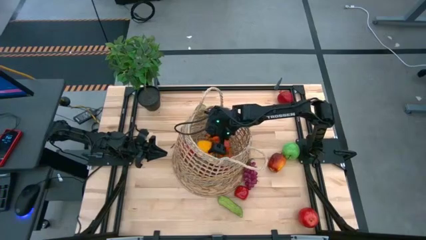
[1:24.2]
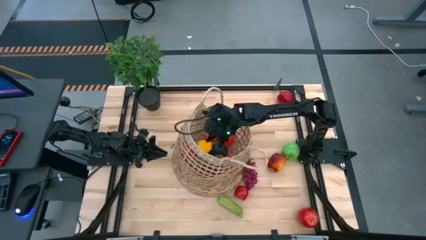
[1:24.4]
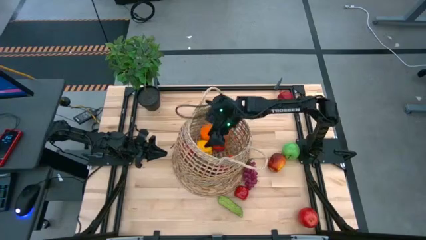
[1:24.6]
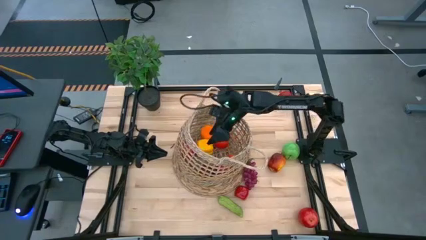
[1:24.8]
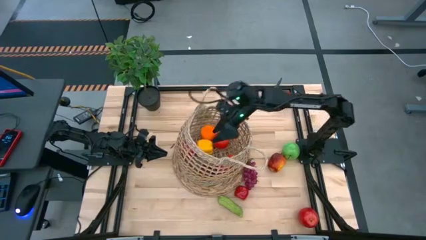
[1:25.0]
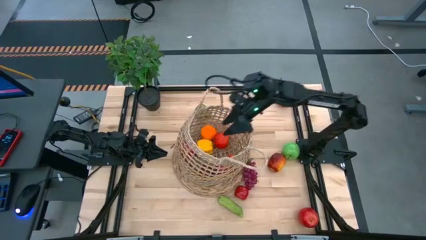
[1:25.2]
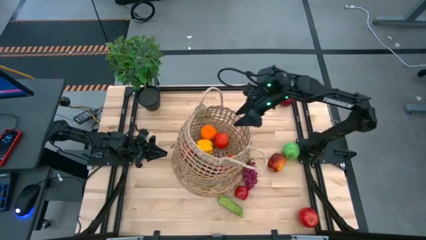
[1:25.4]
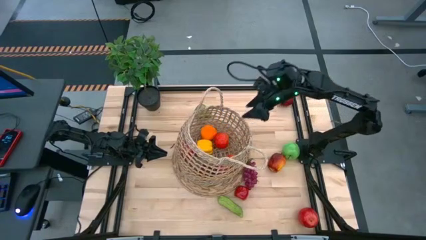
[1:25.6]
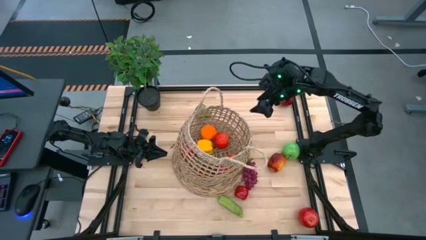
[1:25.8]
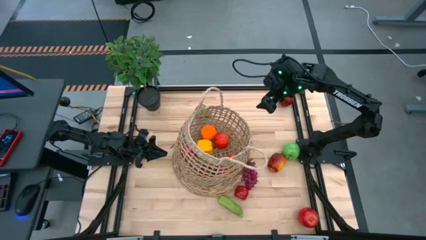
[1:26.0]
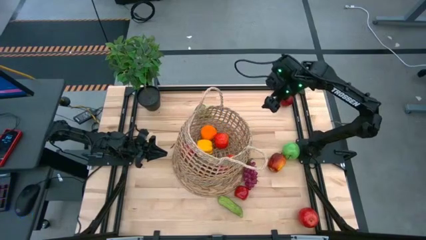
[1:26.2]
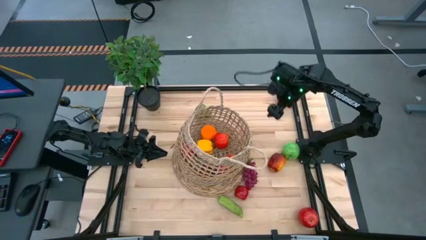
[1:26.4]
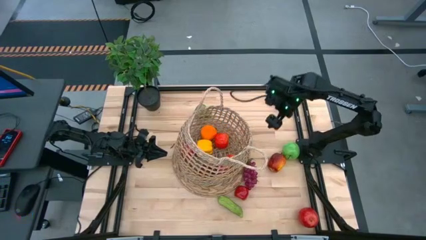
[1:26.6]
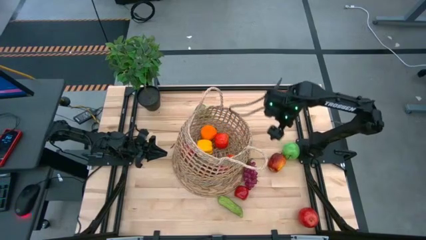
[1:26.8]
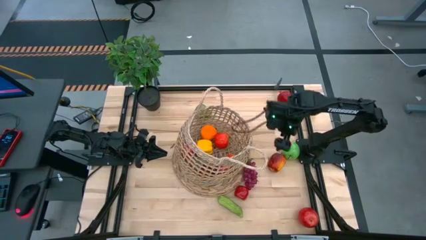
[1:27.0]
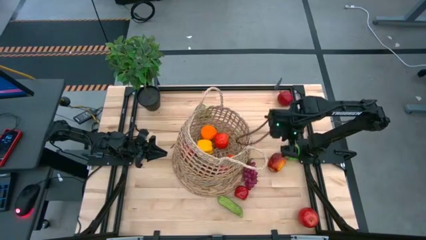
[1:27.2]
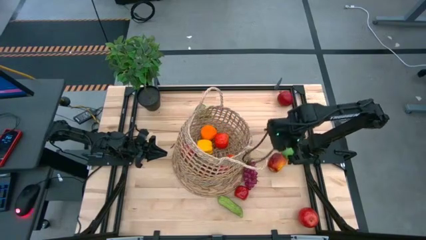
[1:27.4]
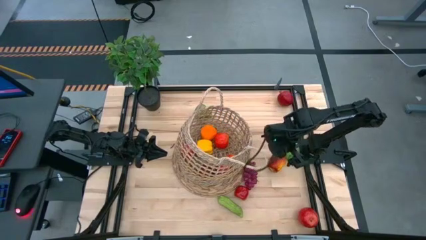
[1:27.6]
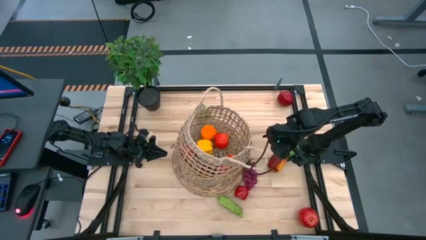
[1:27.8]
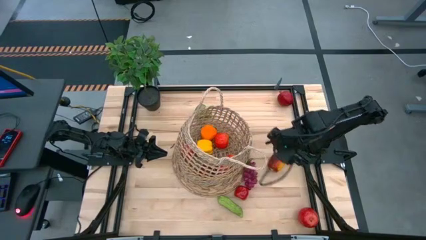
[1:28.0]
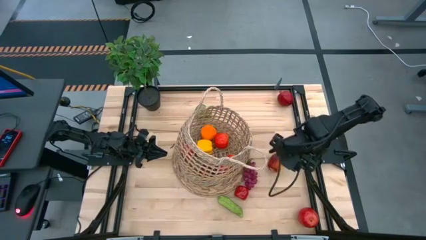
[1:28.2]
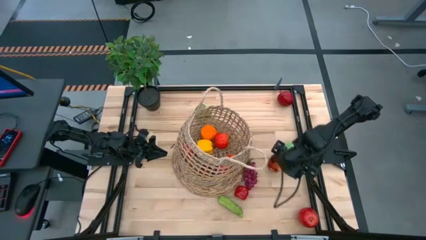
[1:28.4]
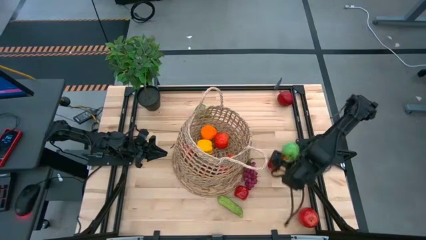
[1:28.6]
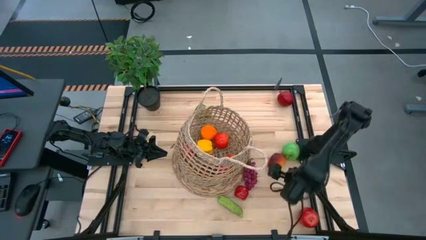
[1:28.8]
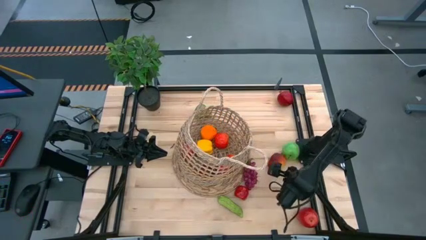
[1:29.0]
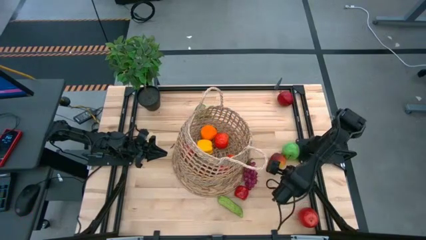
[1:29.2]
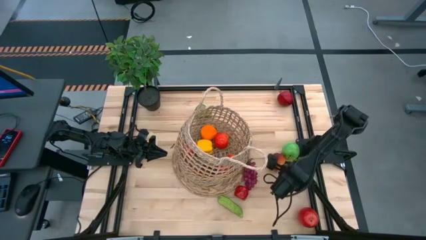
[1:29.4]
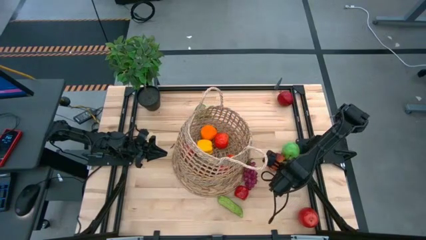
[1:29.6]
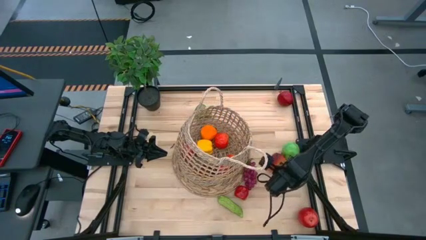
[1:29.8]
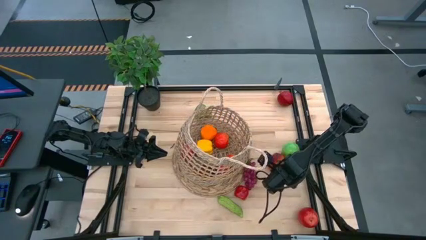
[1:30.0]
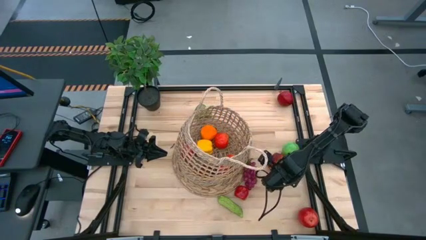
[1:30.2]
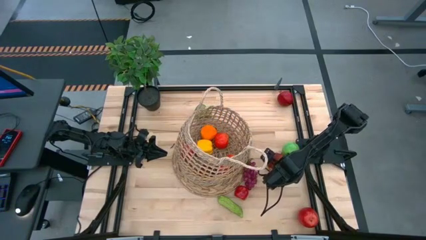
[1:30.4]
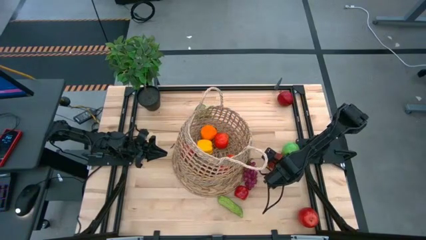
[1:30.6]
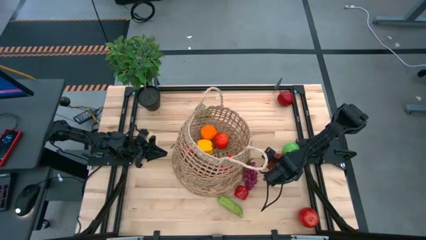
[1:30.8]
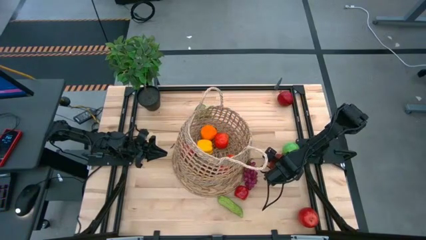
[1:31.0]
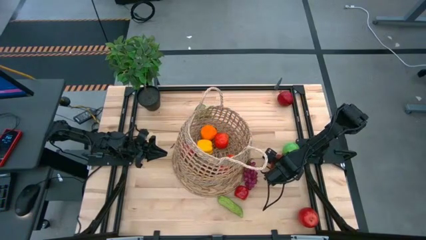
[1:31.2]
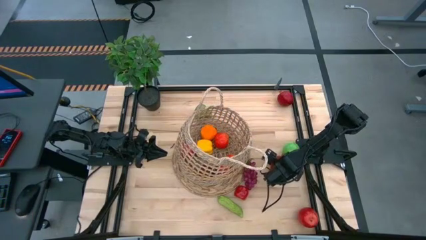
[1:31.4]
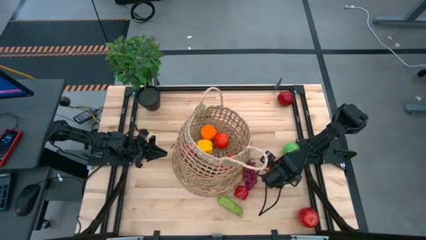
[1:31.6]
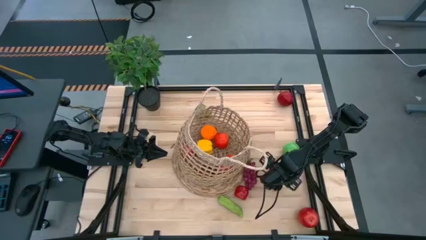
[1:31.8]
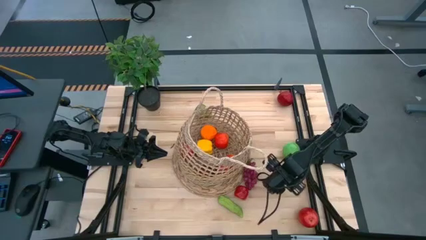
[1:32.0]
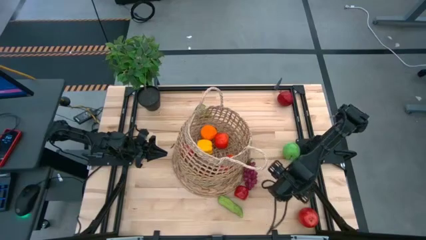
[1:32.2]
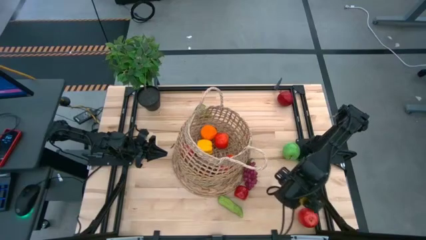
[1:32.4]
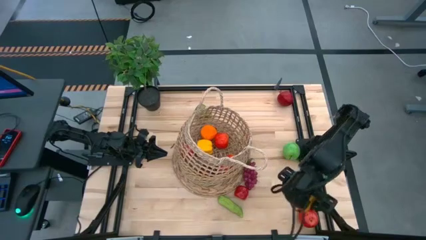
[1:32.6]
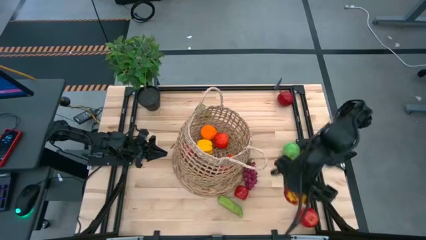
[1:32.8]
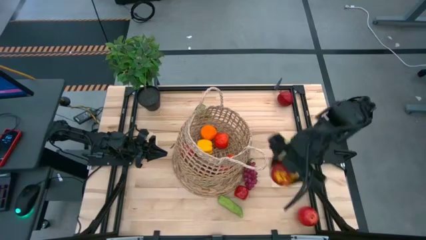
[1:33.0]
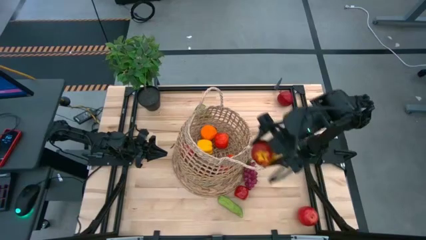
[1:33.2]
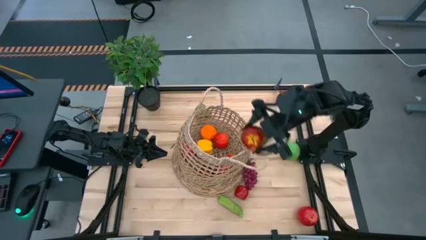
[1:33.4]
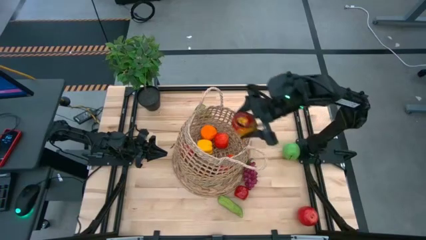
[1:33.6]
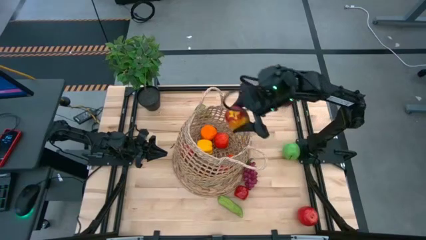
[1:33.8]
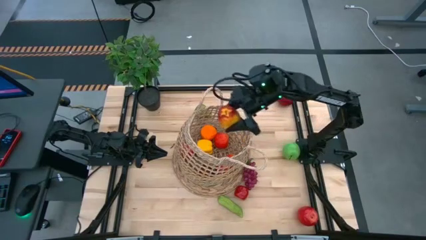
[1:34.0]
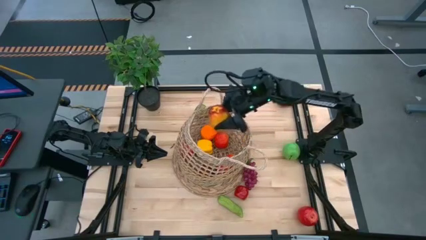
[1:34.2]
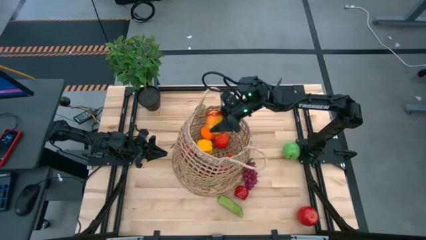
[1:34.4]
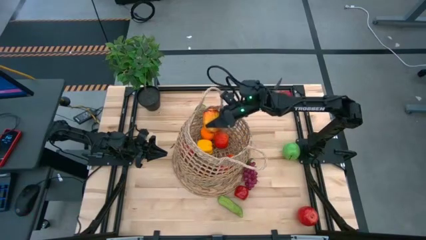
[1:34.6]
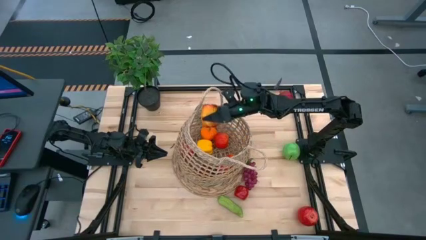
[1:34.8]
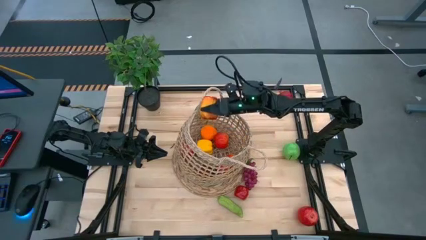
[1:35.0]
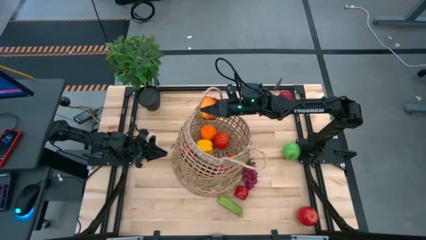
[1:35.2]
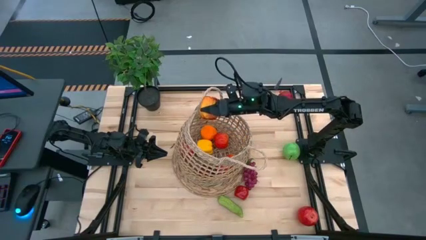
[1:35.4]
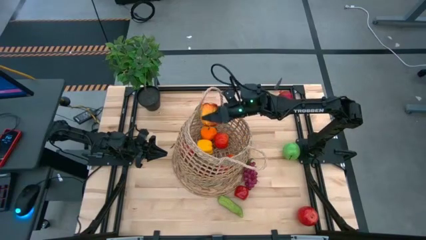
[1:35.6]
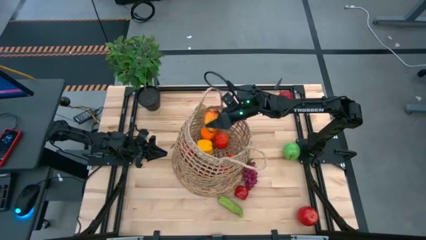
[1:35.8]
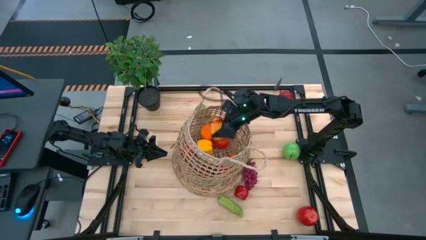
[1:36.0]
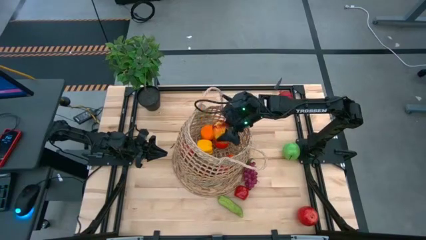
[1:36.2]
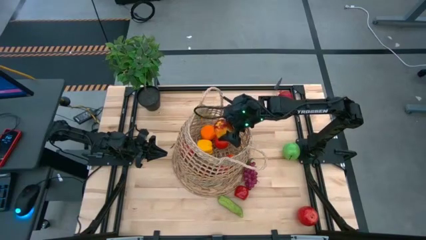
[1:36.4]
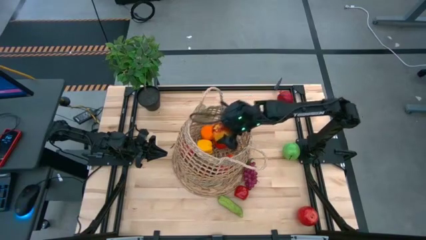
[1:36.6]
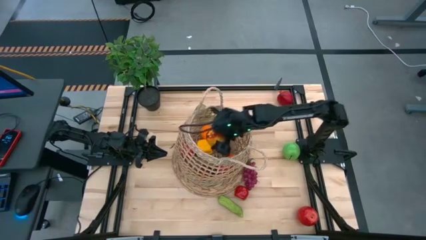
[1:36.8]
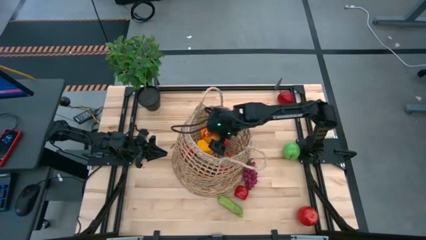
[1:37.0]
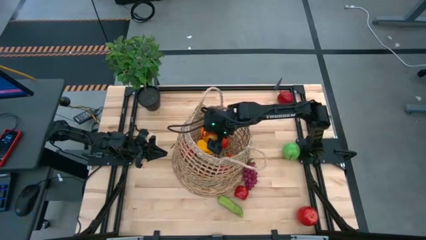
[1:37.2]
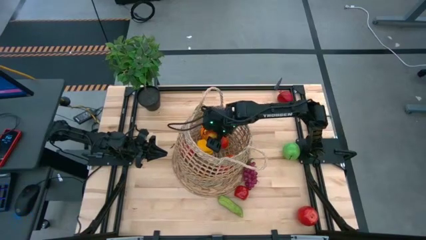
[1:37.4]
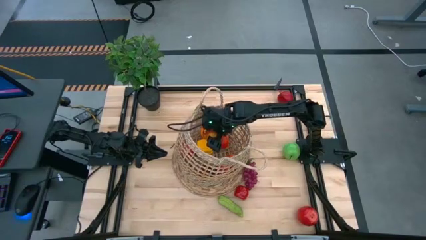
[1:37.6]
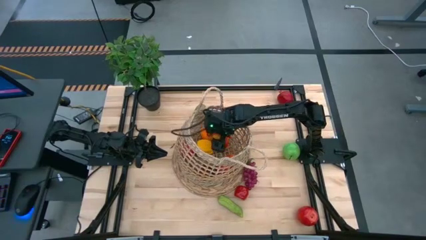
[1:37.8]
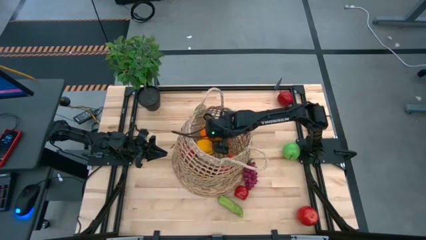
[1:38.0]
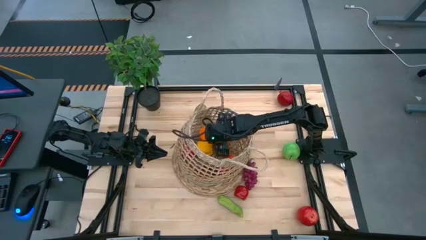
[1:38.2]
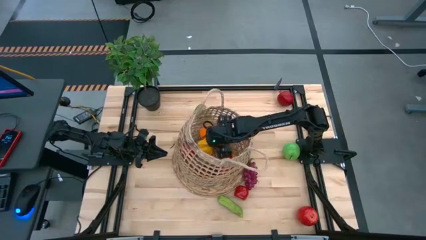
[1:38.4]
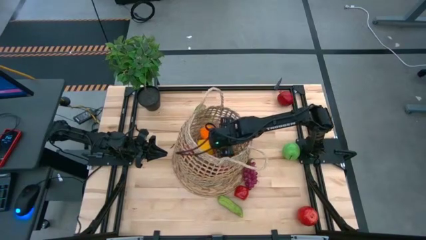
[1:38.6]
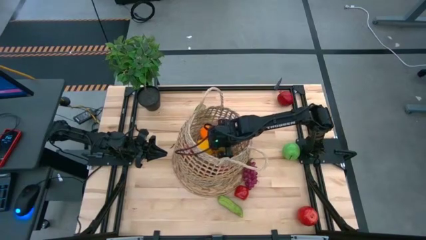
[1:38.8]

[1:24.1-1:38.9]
Task: Build produce basket
Put the red apple into the brown basket

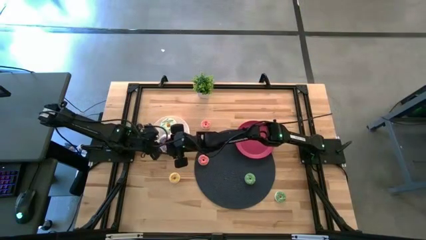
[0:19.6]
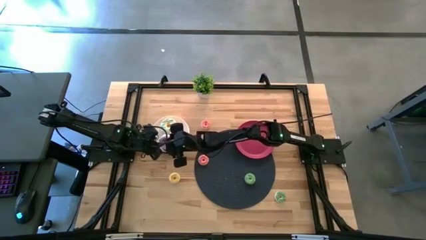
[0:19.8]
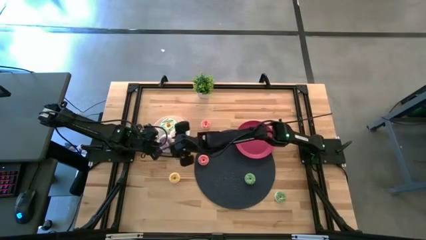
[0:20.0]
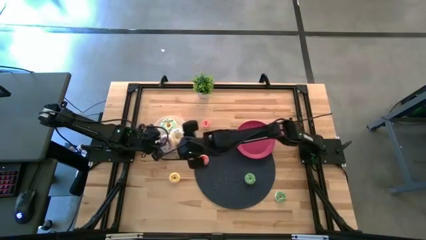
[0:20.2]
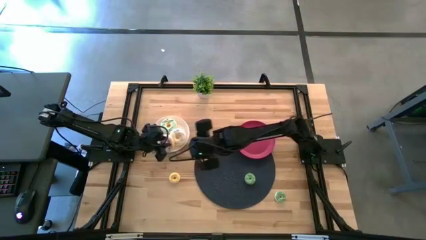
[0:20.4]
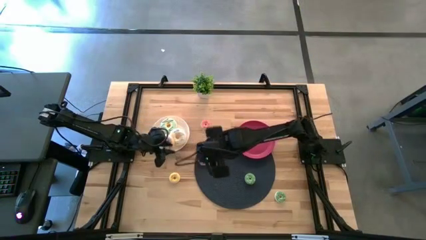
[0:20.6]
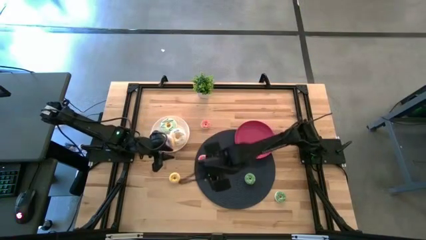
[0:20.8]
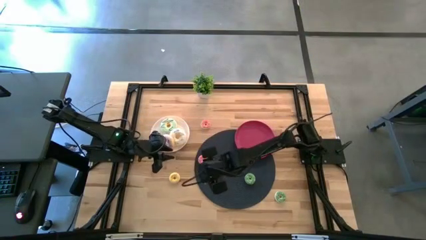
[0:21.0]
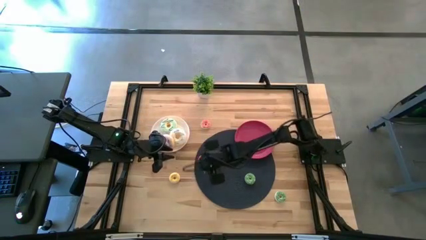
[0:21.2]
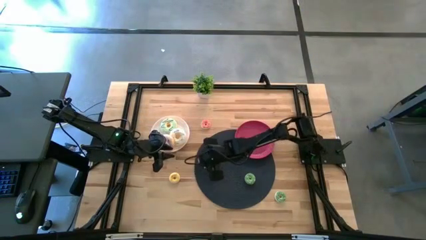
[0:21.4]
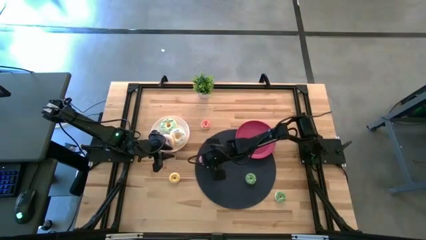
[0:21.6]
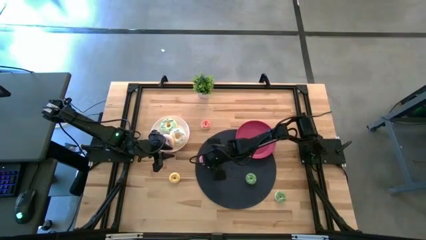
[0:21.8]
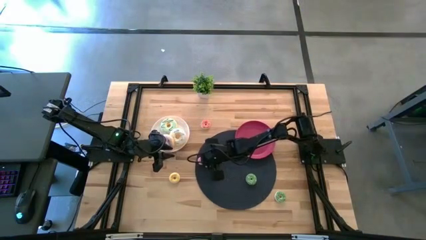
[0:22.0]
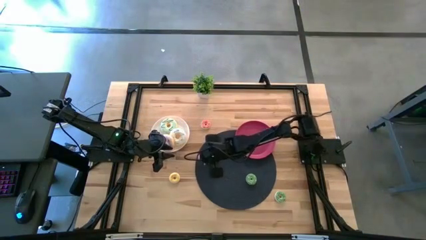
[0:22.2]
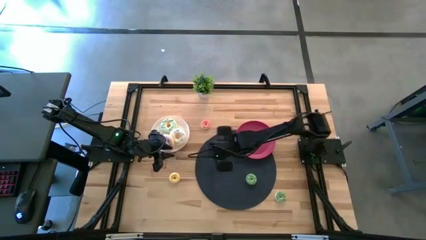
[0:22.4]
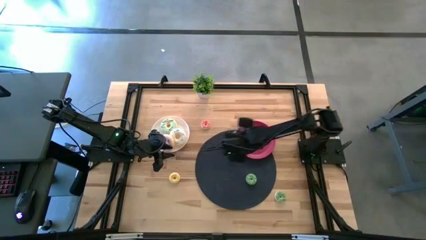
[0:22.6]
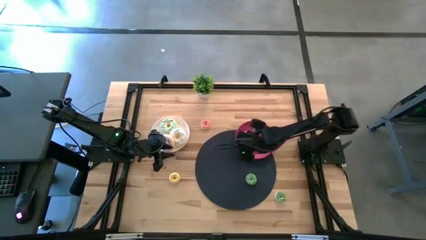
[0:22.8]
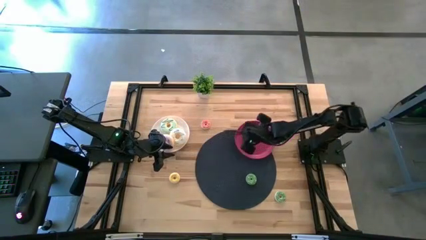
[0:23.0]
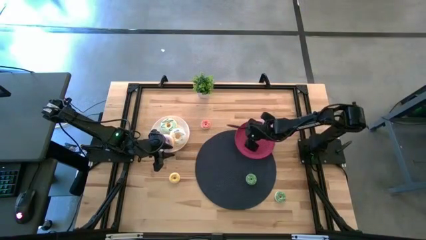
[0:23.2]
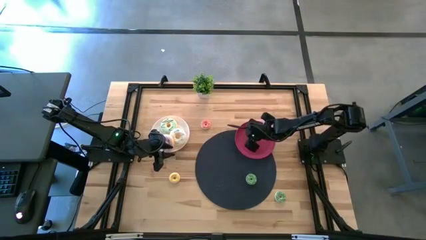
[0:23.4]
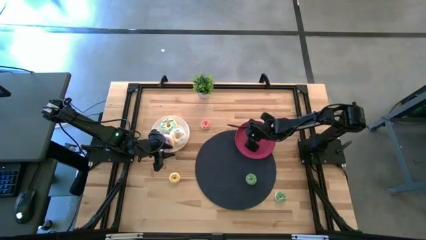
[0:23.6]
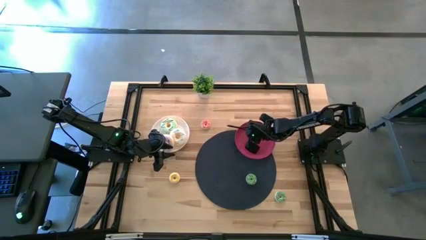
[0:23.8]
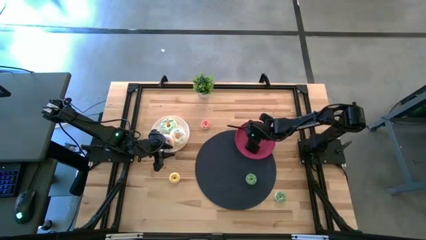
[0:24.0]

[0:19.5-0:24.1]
Task: Pick & Place donuts
Put the bottom small pink donut onto the red plate
